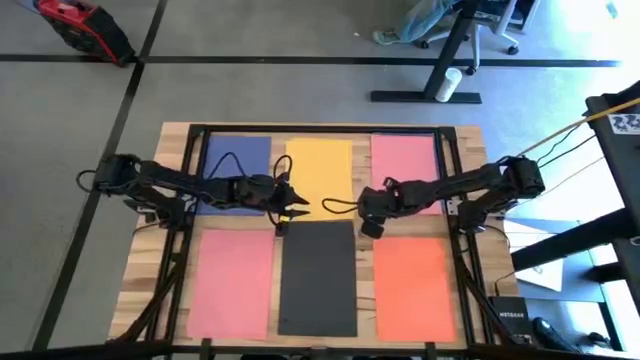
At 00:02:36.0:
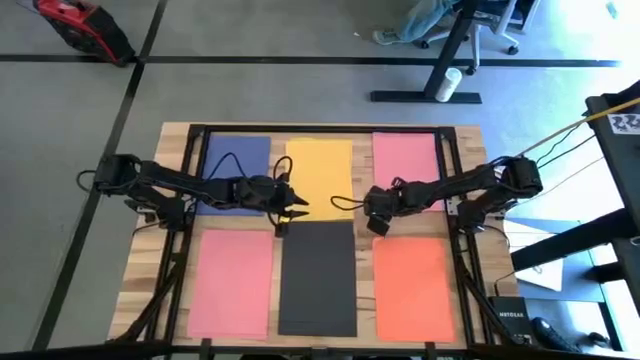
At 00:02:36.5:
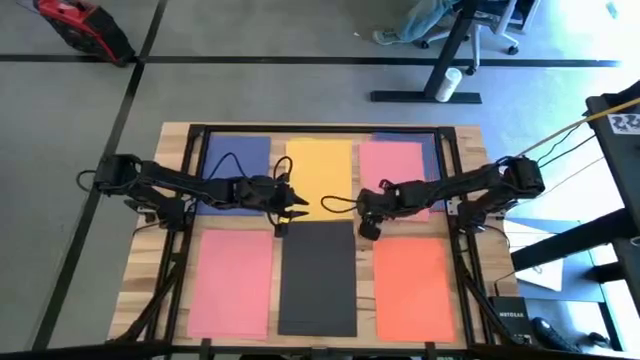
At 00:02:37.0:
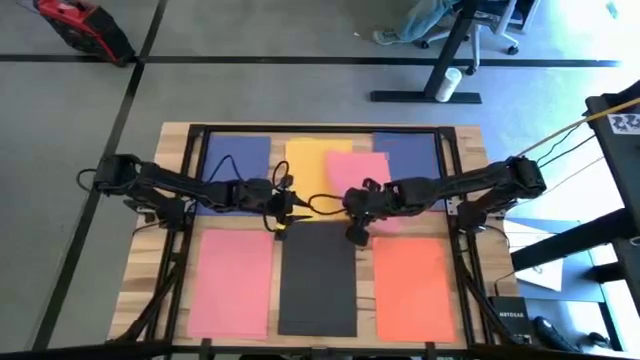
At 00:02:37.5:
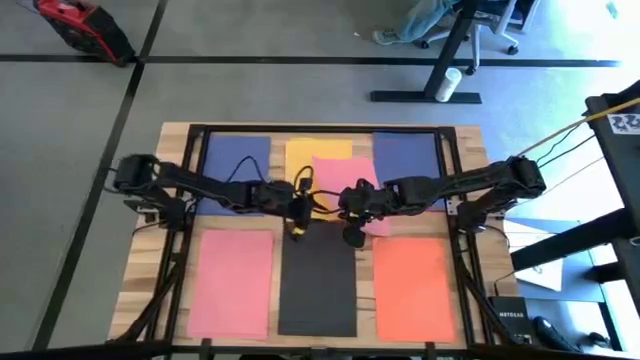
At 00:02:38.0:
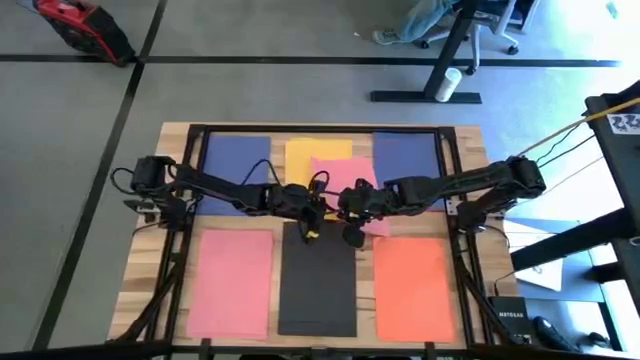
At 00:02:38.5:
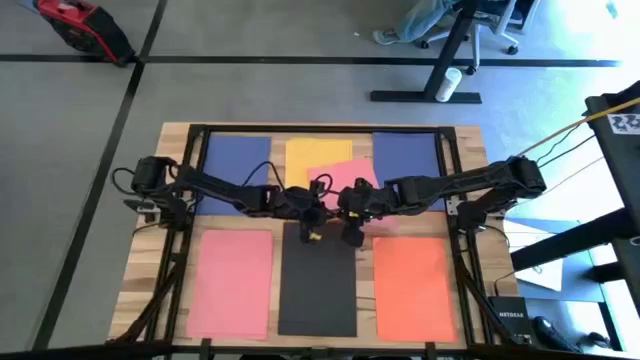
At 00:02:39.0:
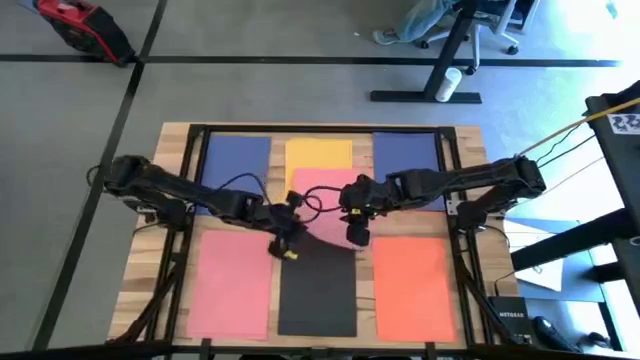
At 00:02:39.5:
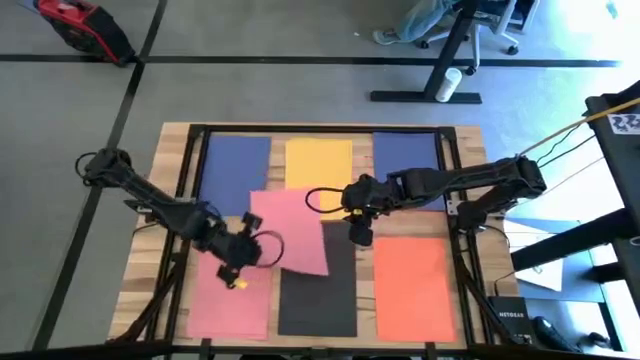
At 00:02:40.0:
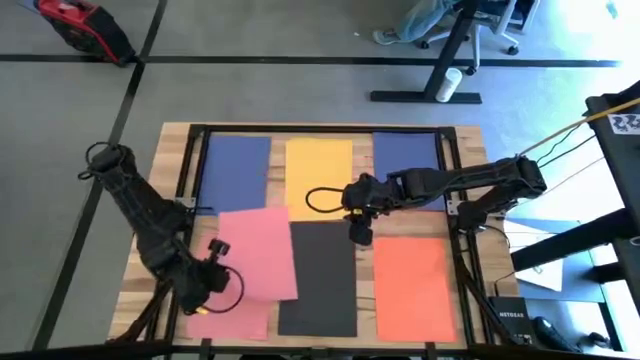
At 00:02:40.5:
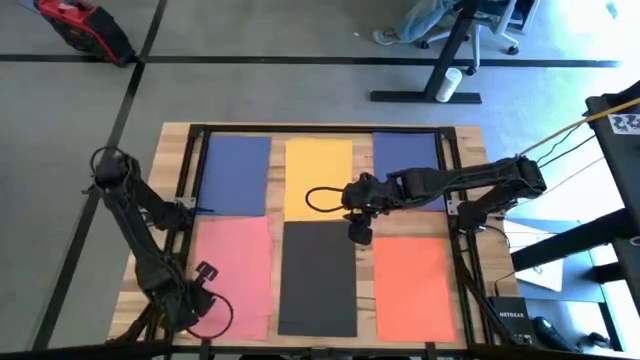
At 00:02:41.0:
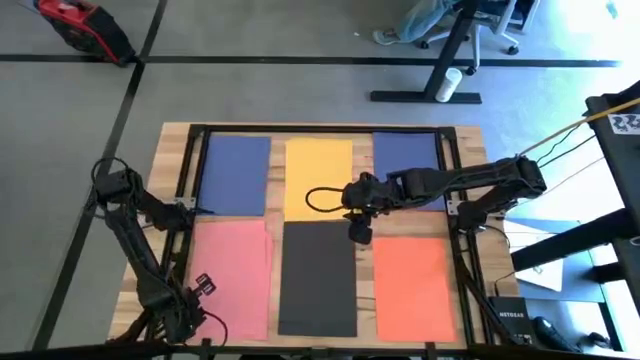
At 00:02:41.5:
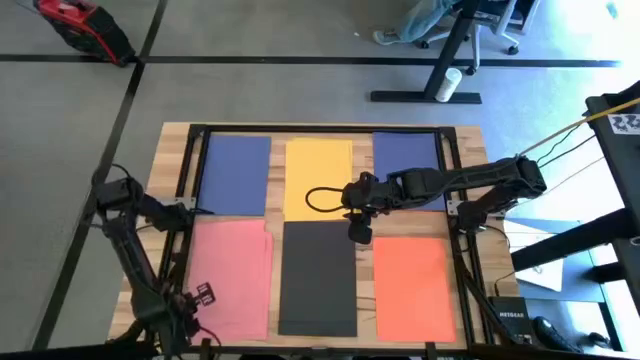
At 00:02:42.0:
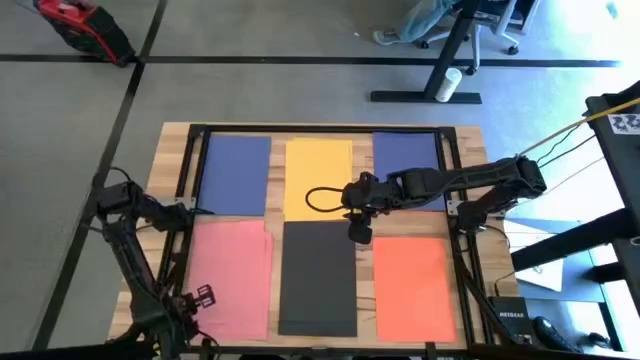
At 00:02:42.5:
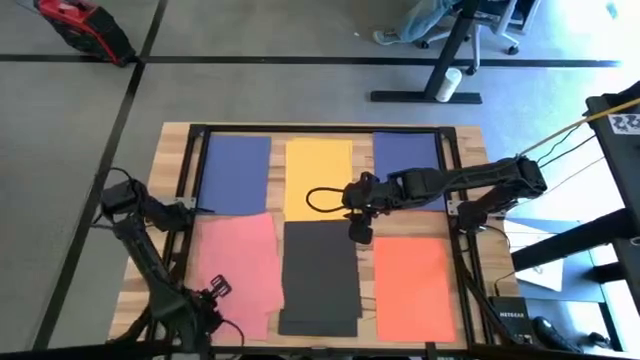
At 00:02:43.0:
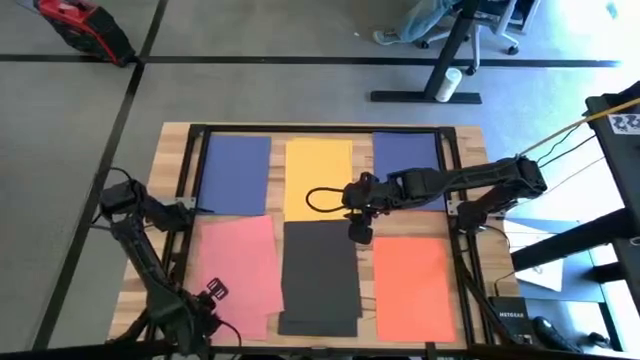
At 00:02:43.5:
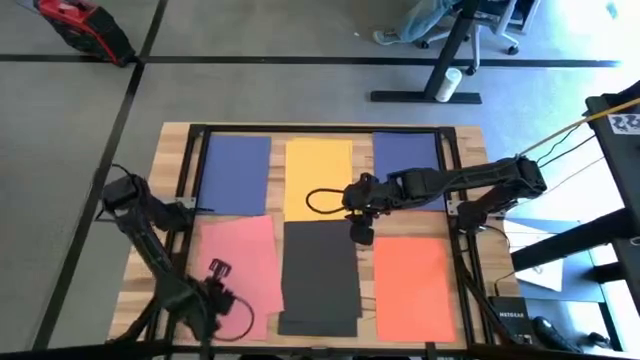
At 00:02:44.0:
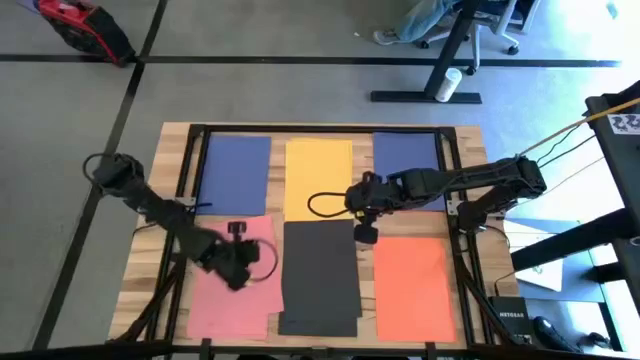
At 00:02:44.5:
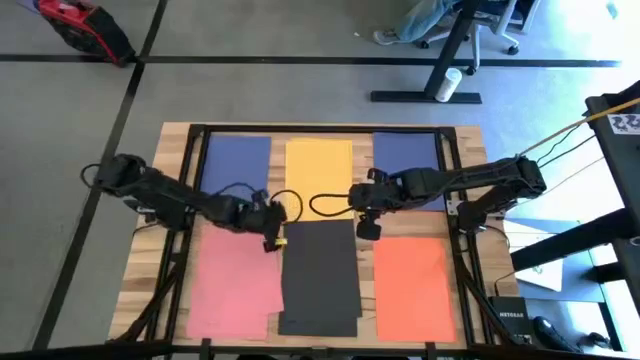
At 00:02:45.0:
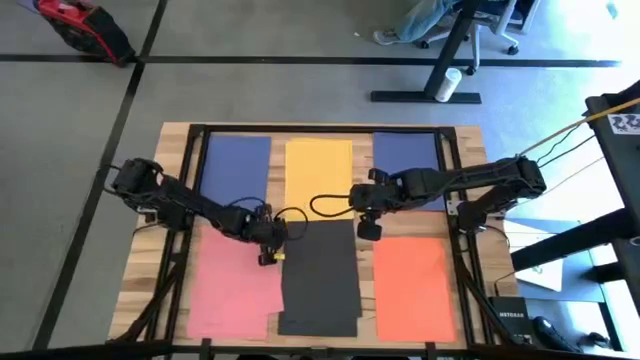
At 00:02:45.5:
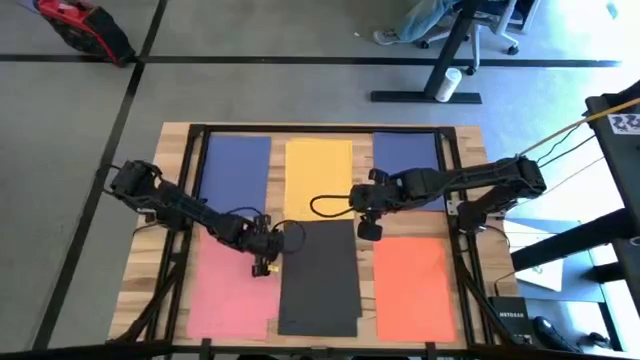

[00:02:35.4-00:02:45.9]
Task: Organize paper
Stack the pink paper on top of the other pink paper

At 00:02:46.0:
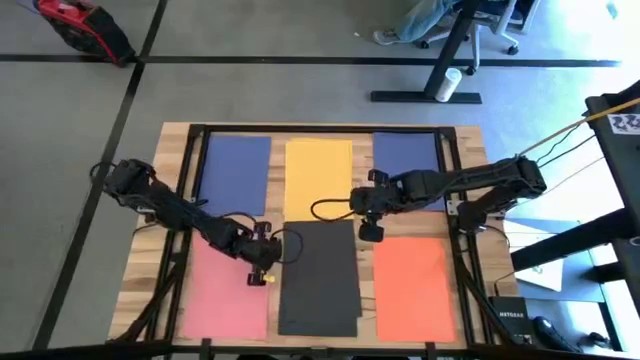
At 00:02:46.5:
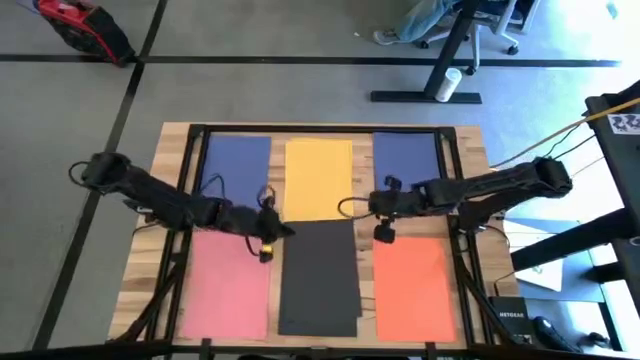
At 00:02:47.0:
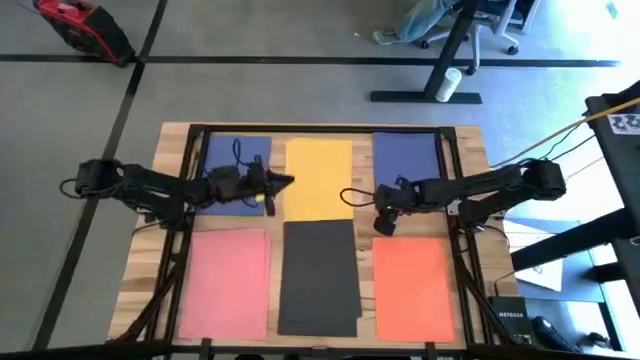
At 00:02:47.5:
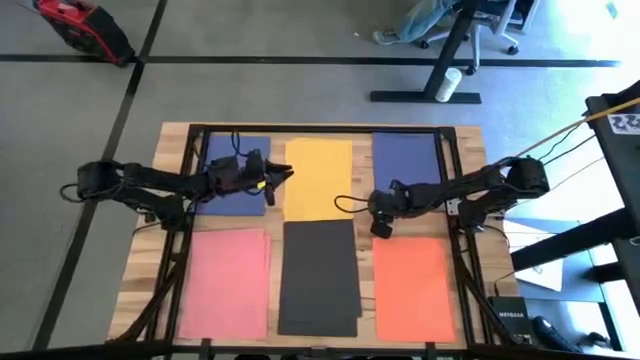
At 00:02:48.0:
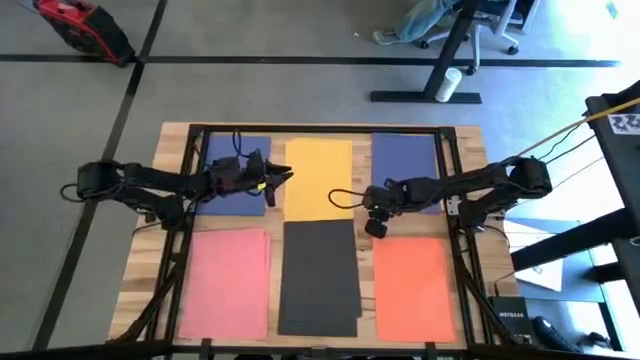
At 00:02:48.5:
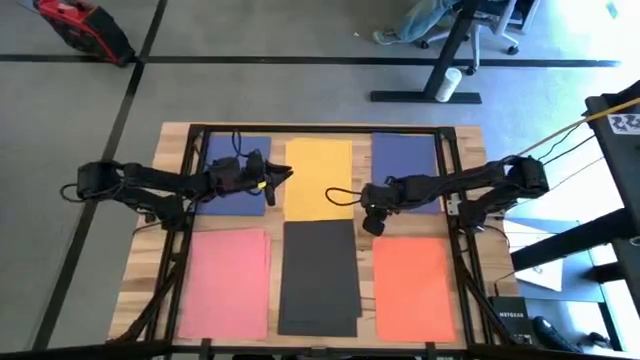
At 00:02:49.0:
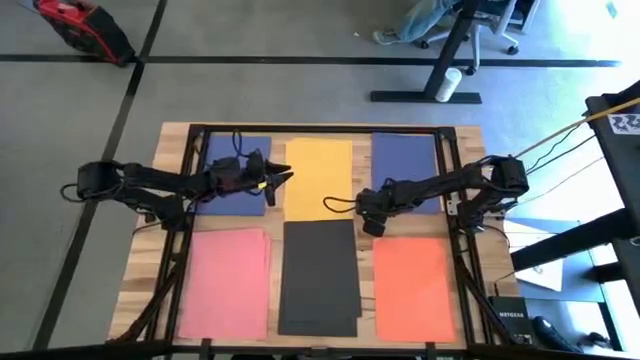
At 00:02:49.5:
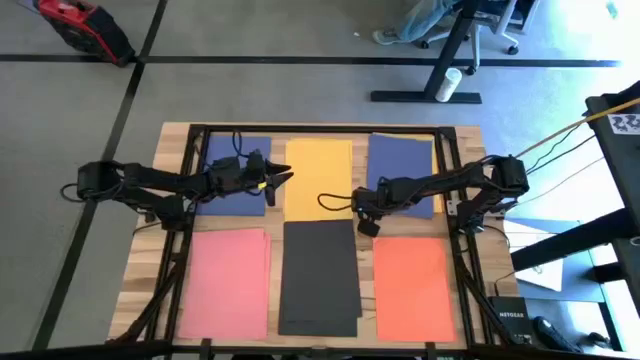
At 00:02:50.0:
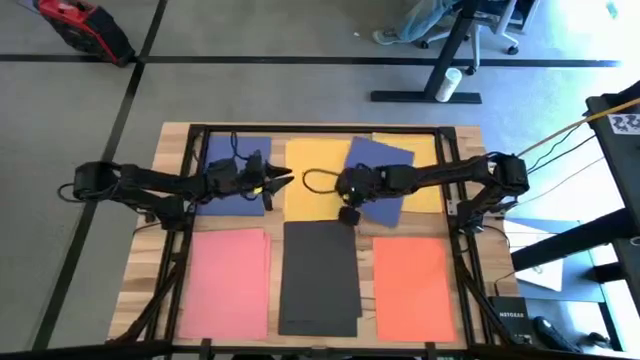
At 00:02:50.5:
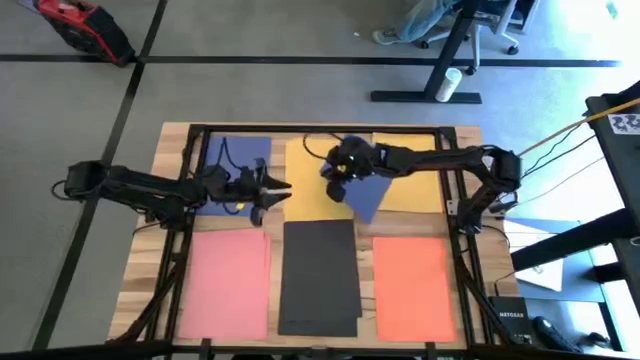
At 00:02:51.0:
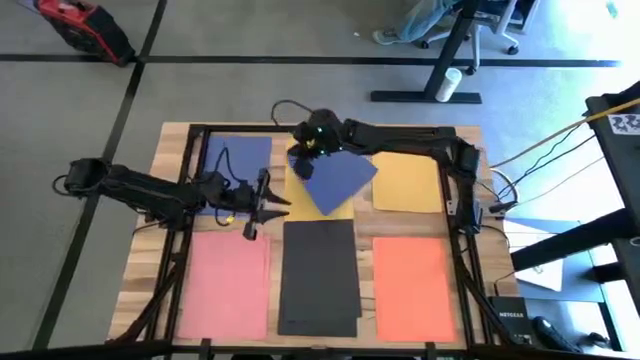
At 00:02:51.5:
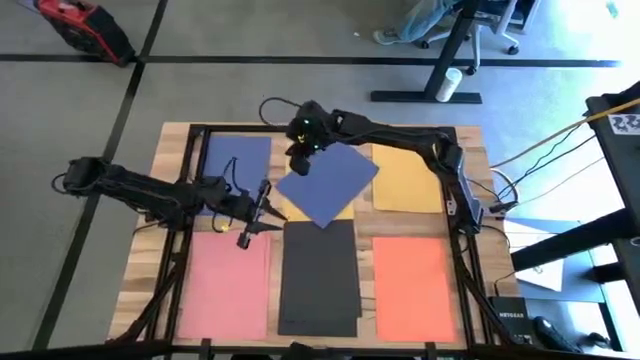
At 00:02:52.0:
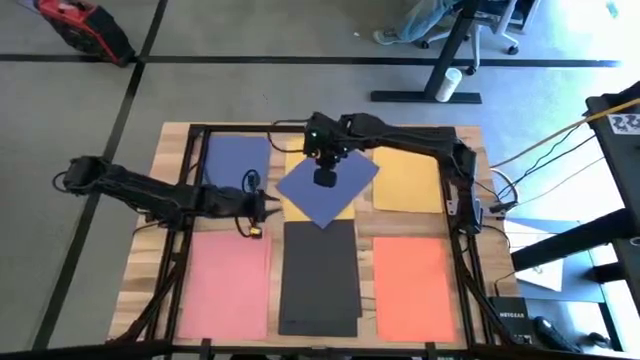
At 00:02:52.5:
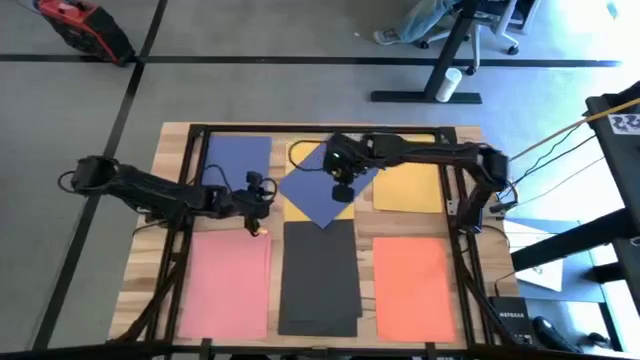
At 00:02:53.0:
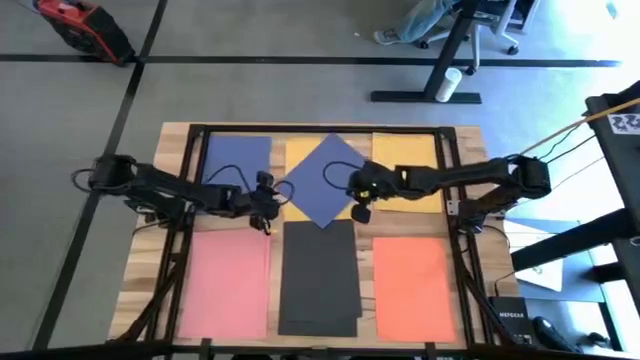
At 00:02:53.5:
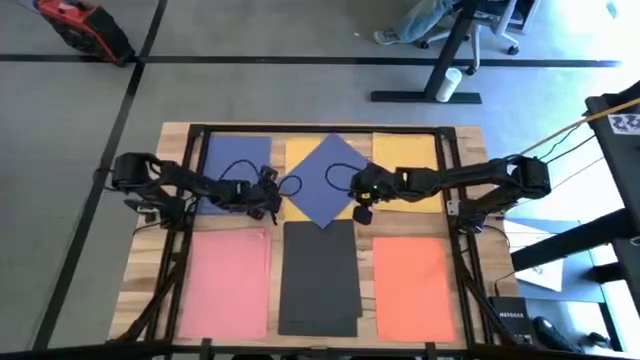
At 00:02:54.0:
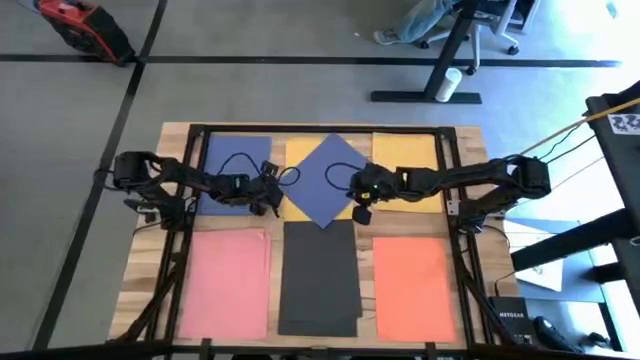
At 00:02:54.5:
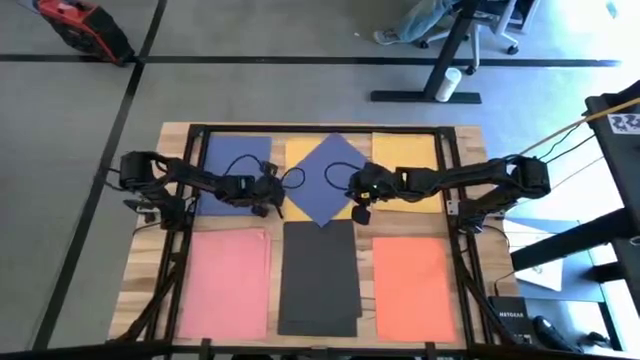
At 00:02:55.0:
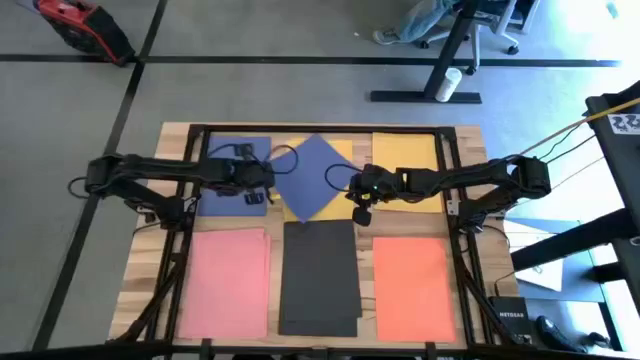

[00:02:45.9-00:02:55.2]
Stack the blue paper on top of the other blue paper
